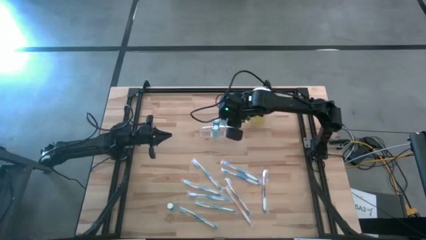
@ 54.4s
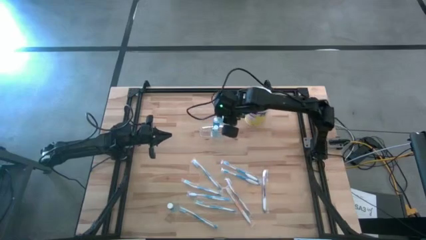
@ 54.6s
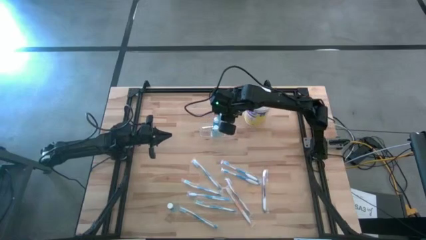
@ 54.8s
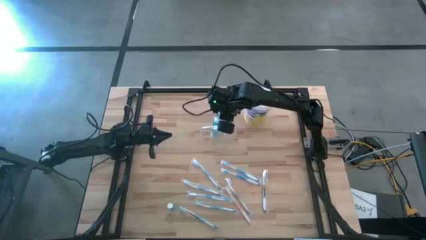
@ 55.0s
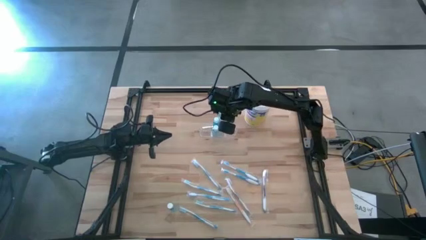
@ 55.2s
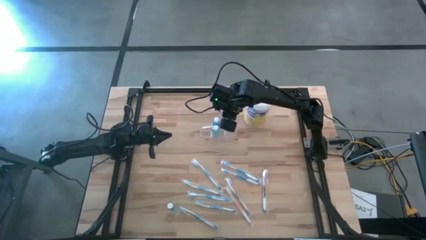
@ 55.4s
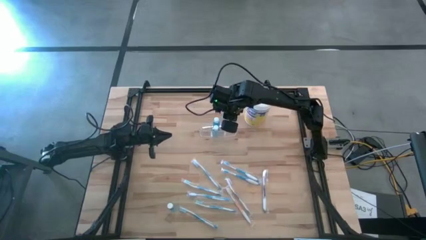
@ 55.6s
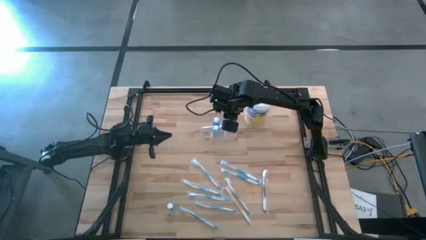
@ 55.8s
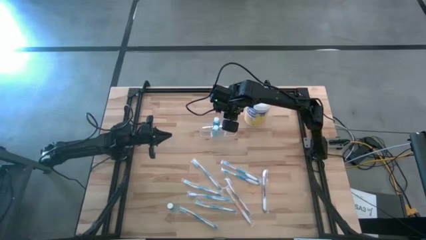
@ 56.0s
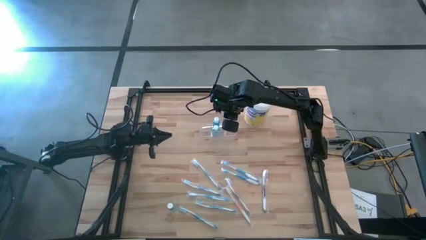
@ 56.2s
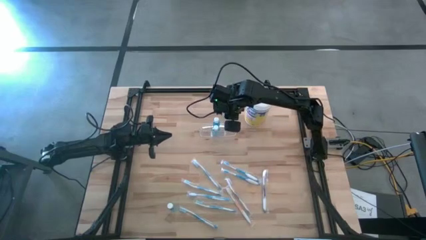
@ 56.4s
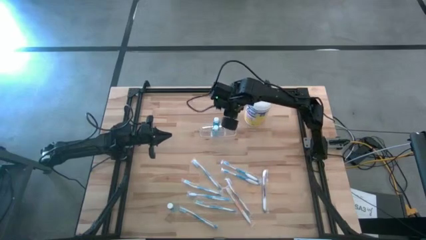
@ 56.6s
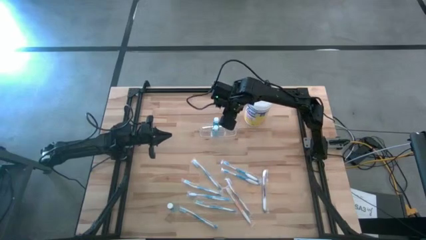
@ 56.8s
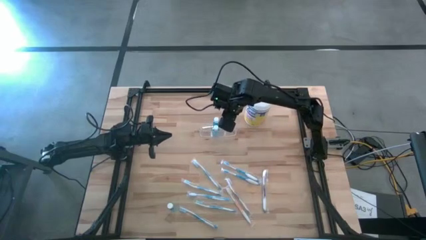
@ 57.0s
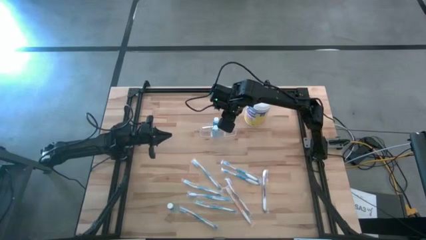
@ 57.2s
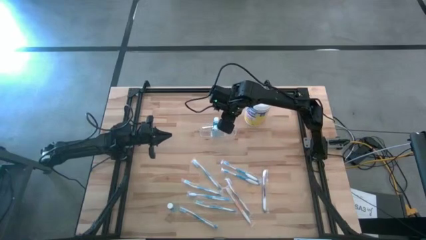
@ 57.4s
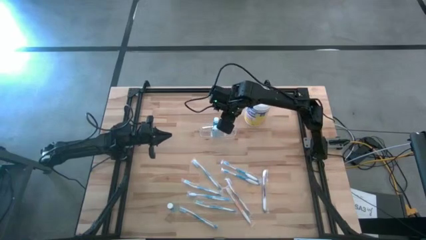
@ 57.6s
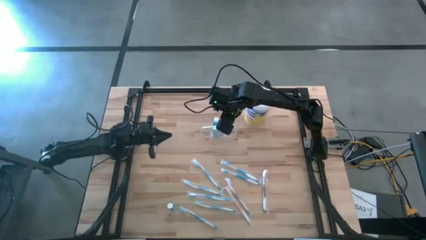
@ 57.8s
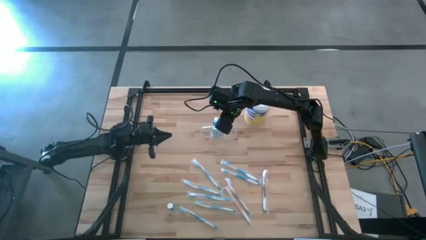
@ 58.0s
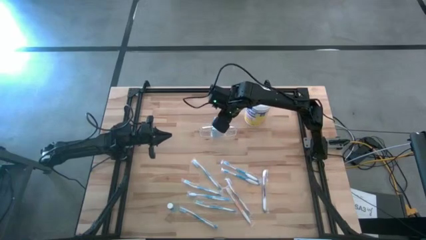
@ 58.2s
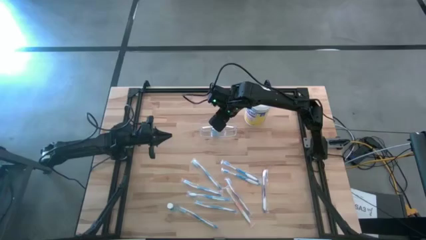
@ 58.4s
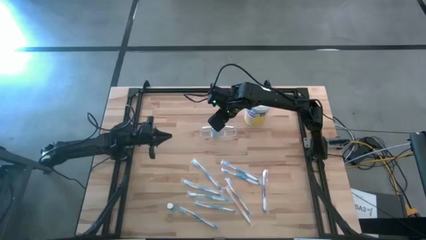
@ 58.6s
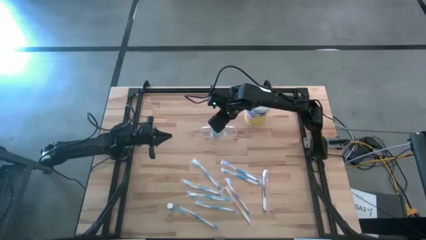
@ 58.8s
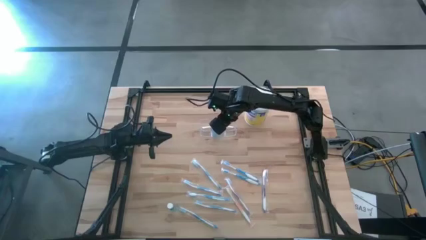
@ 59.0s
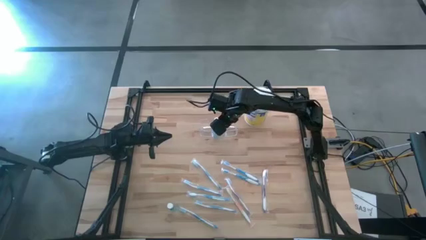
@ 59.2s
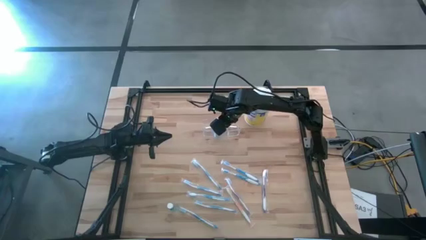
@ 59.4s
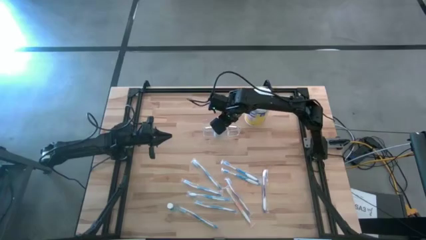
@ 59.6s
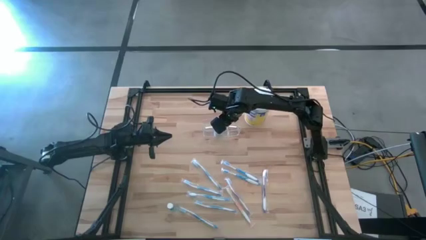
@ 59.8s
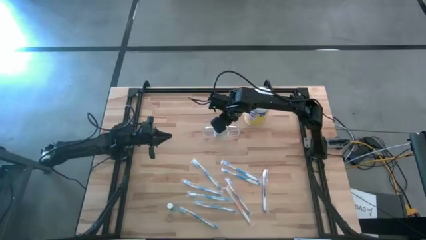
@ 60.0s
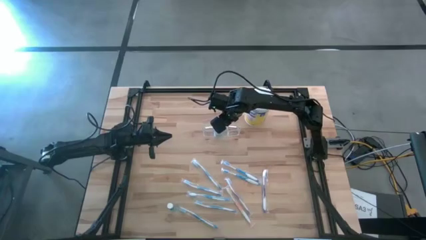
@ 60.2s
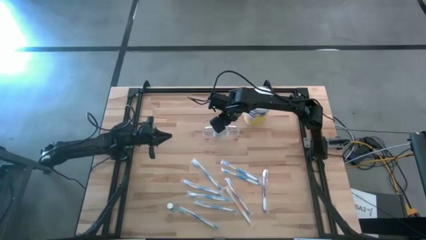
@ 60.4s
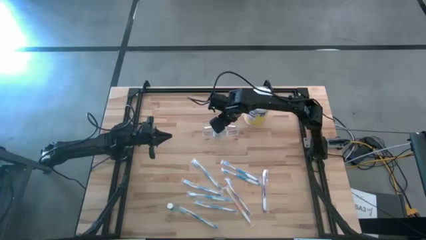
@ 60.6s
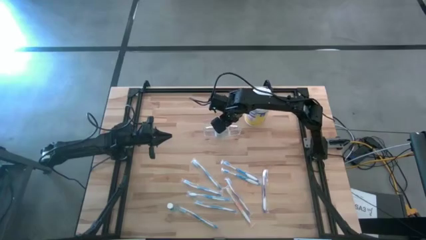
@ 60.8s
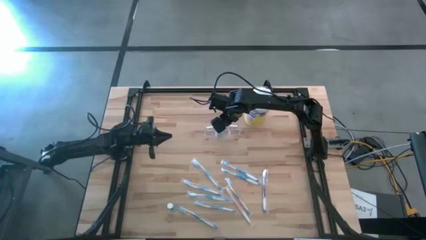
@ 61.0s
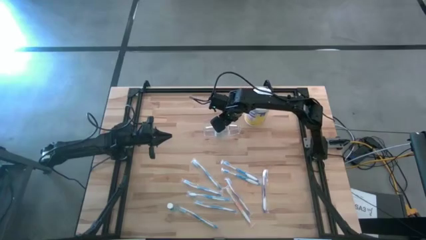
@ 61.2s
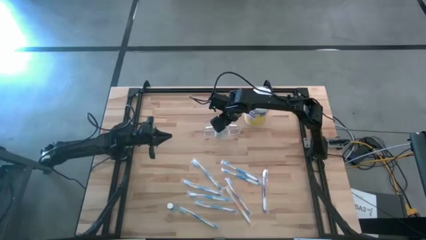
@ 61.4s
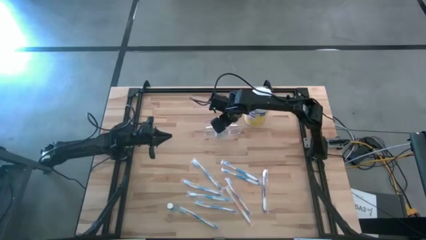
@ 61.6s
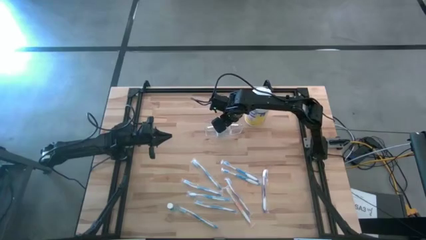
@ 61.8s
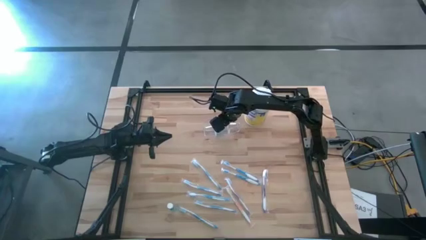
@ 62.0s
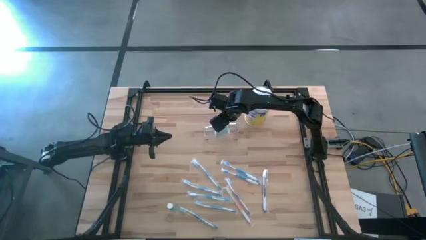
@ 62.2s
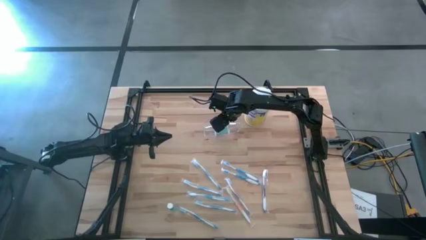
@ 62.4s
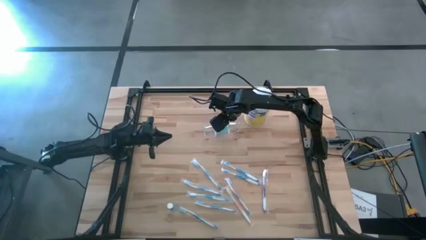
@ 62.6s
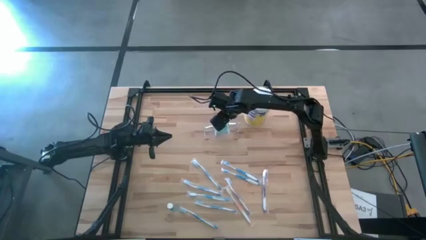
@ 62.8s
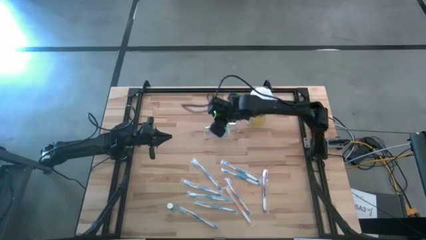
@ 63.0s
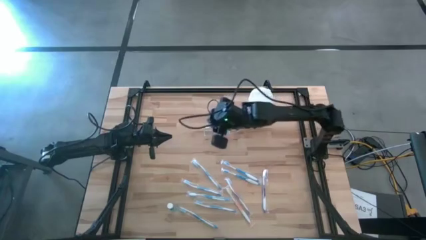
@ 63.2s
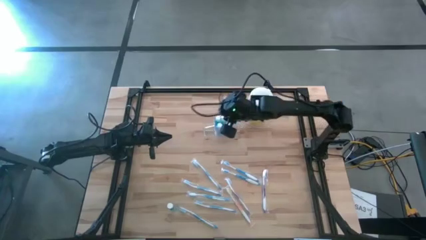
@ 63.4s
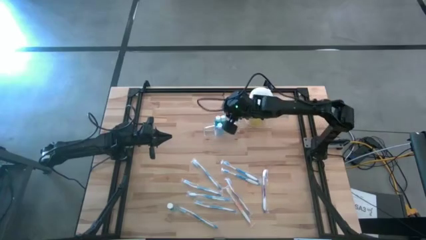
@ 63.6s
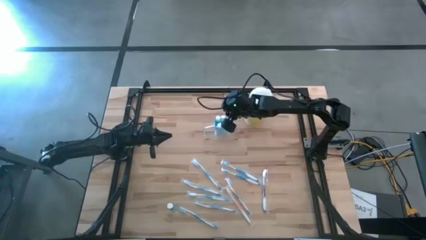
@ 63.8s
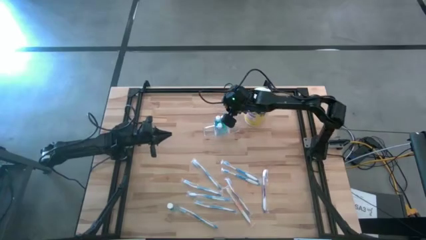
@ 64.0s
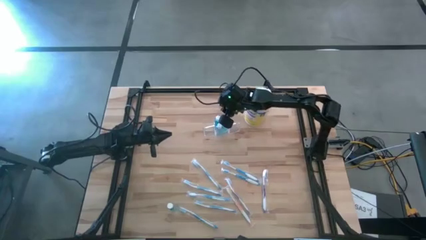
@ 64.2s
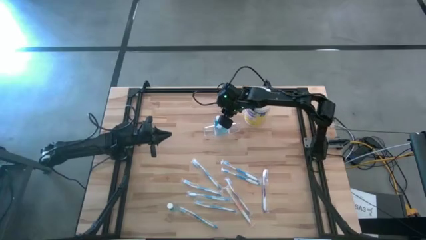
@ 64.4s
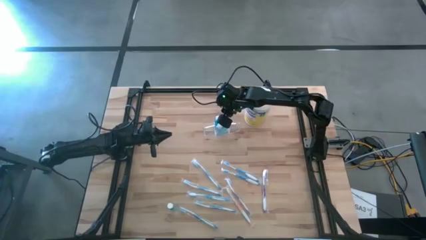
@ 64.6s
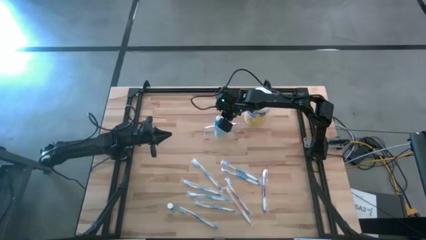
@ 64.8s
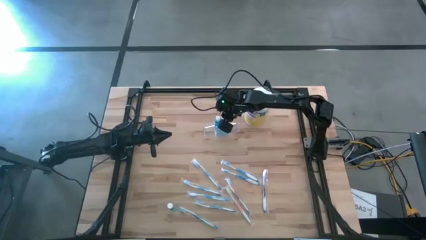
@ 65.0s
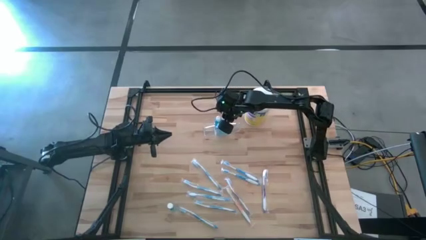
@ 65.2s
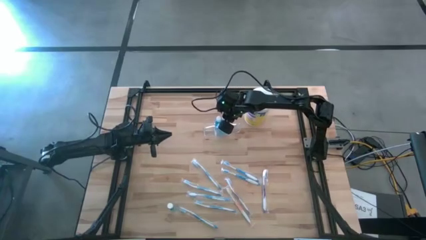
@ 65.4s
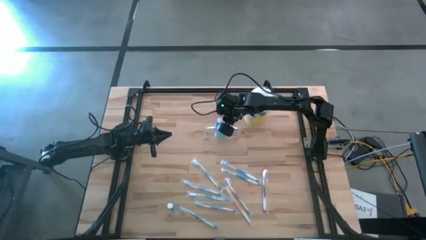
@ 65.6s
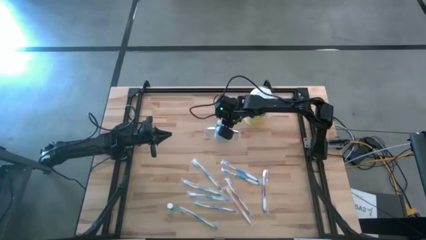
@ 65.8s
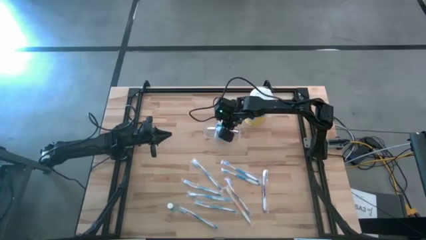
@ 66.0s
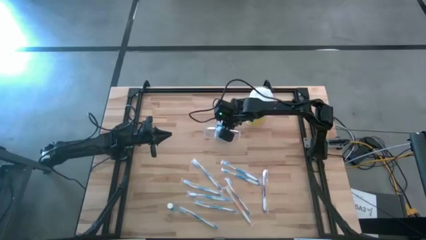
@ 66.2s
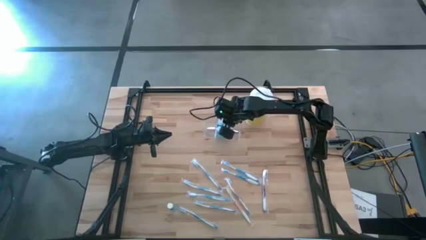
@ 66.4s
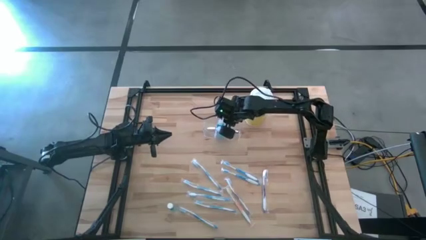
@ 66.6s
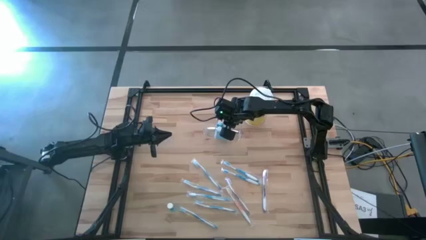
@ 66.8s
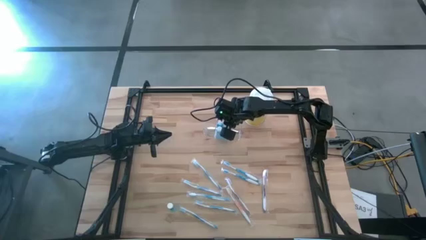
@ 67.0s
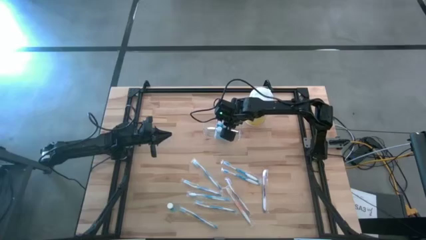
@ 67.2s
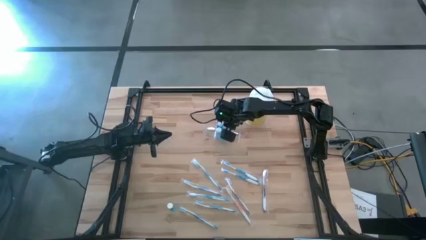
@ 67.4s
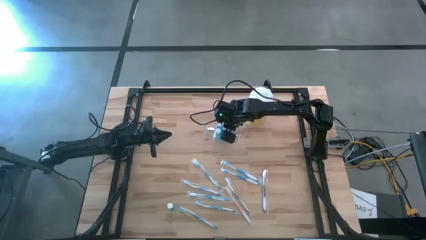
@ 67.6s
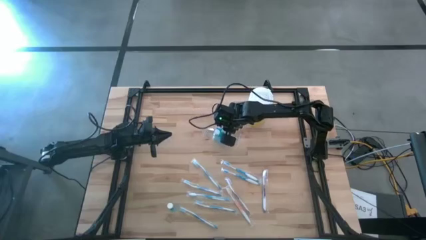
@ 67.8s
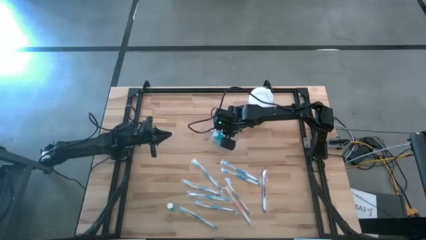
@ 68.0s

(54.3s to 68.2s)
Task: Pick & Place toothbrushing station
Put the blue mouthwash into the transparent organizer

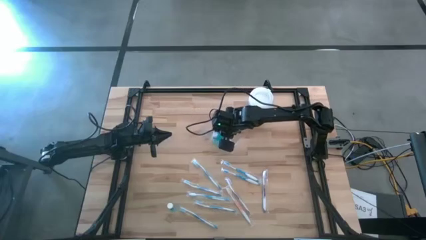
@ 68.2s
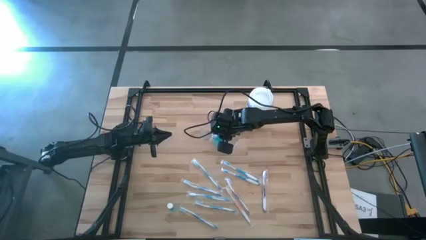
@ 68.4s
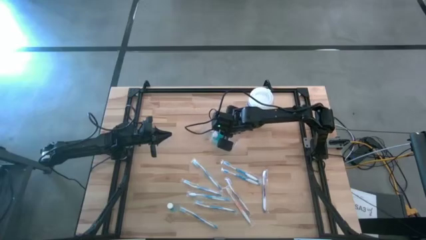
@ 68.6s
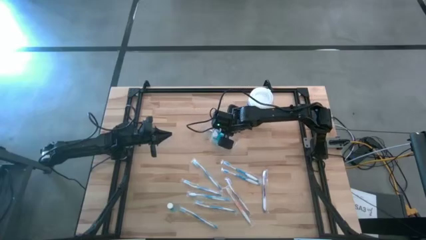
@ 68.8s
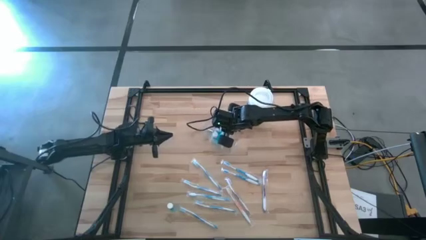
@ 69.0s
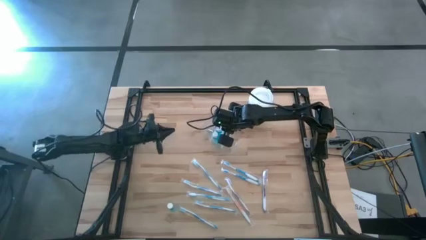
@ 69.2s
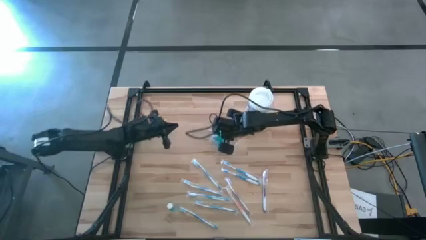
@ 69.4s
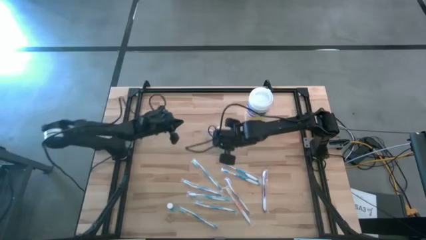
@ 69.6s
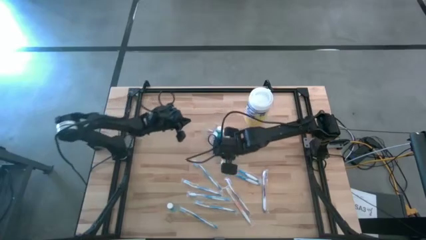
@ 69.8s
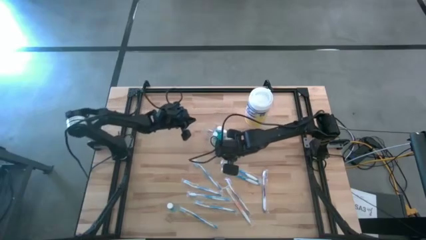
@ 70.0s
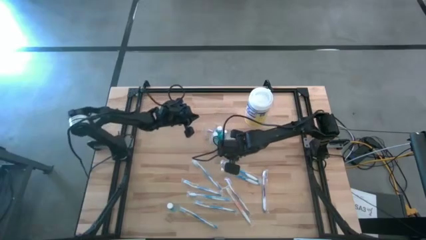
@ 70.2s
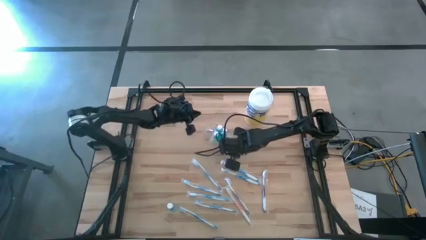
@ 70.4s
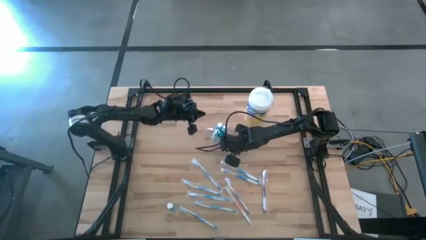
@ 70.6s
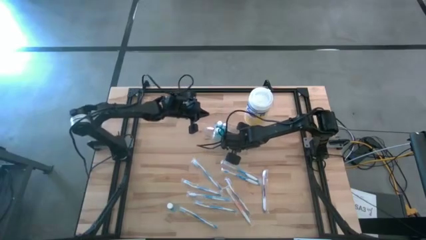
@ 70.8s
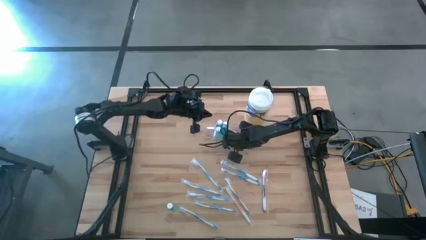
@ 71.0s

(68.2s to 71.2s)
Adjust the transparent organizer
